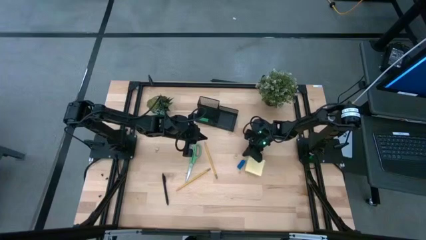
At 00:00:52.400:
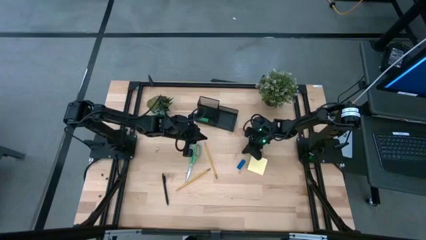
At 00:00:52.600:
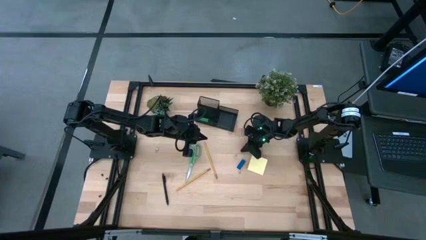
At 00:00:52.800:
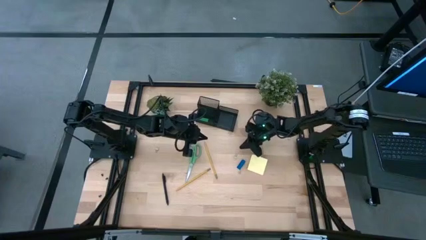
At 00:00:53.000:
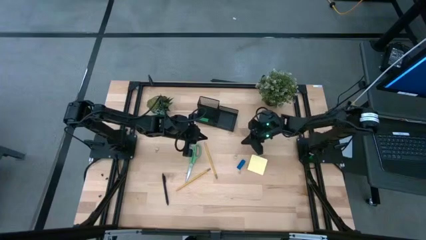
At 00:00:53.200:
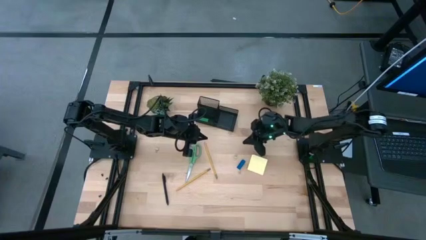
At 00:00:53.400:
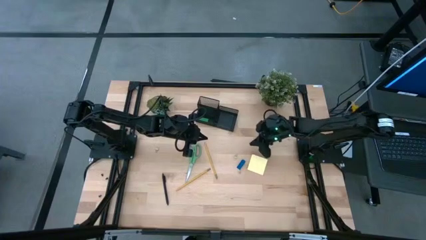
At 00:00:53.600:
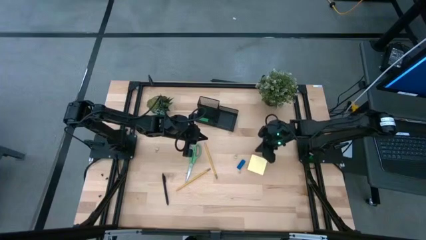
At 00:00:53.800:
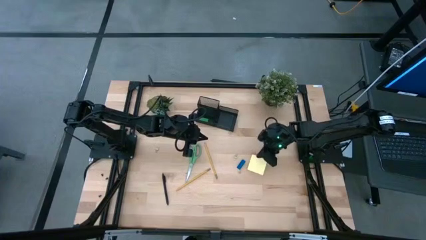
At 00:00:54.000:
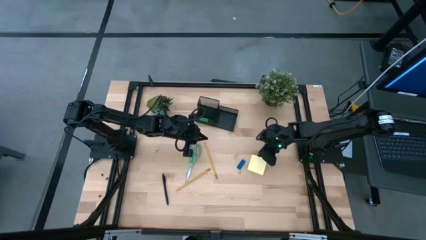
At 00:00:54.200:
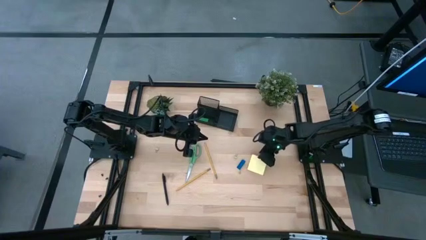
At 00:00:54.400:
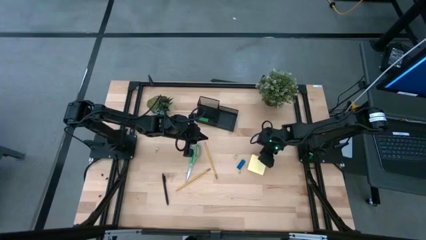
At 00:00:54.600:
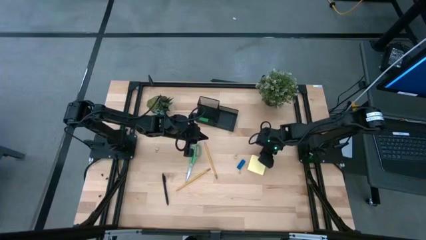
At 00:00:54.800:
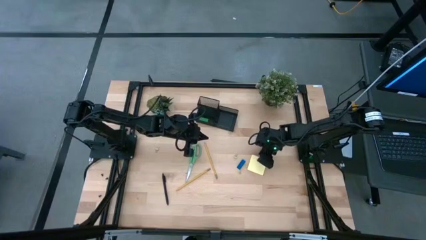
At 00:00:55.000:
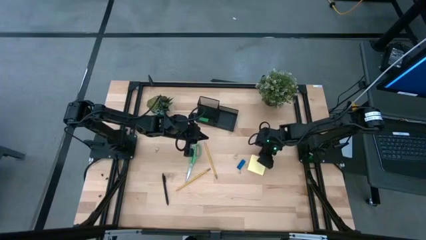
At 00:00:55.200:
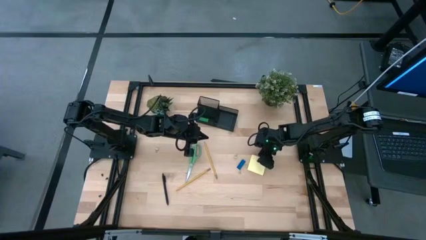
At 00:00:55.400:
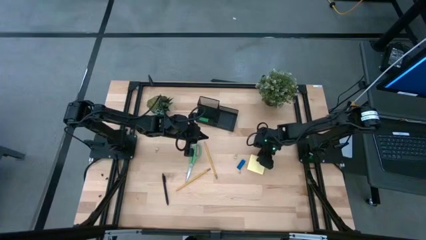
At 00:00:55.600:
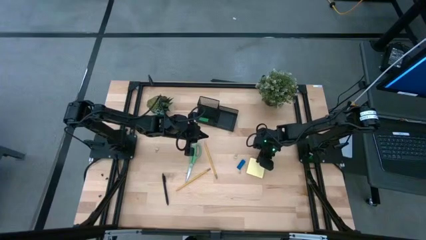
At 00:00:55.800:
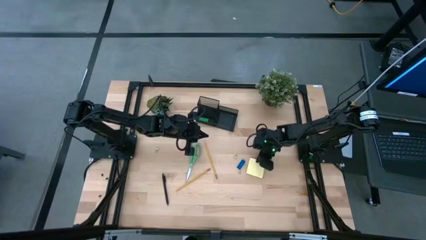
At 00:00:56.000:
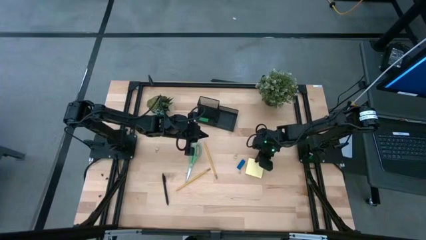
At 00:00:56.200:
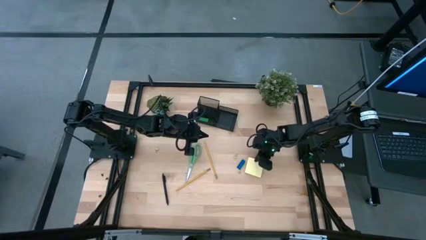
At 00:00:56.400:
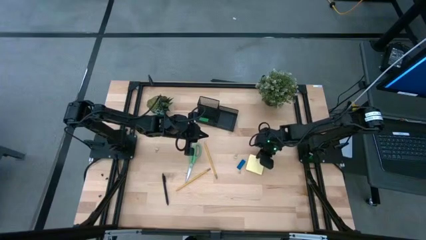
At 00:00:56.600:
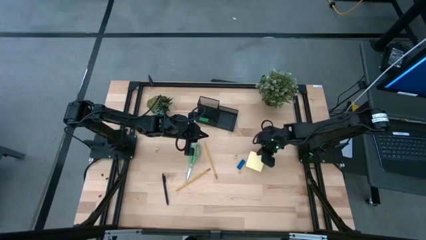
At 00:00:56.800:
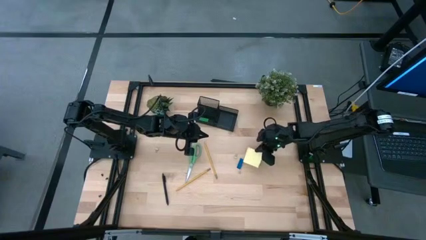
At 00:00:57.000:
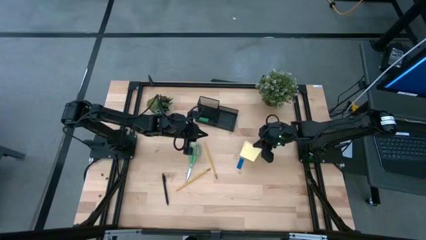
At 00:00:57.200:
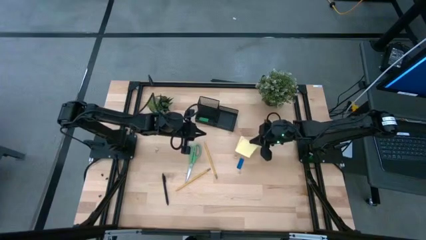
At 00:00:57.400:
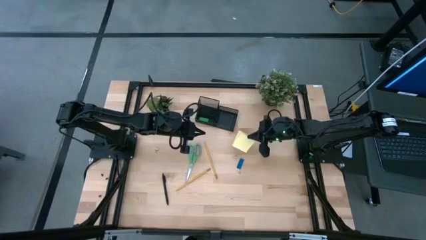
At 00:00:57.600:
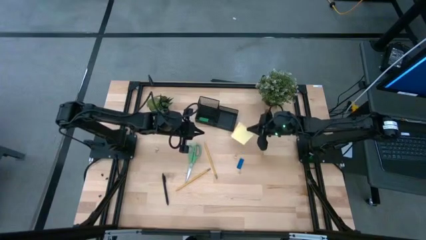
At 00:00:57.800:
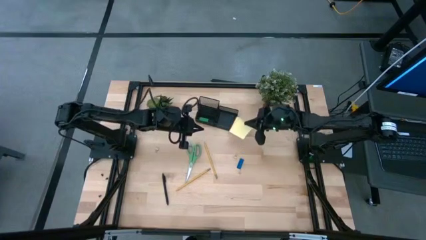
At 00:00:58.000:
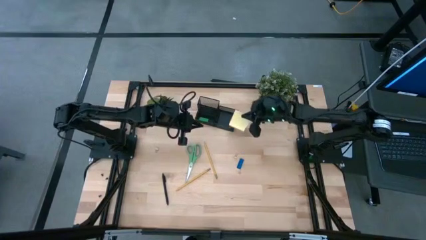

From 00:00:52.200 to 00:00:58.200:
Task: Pick and place office supplies into organizer
Put the sticky notes into the desk organizer

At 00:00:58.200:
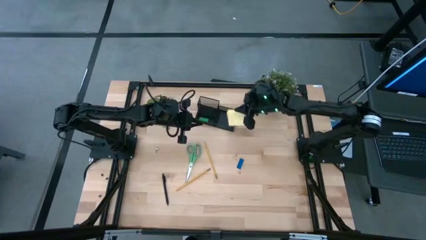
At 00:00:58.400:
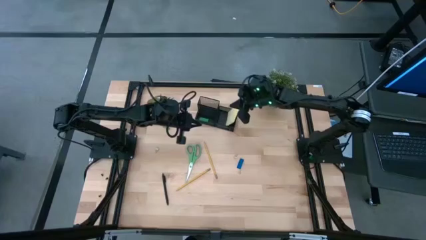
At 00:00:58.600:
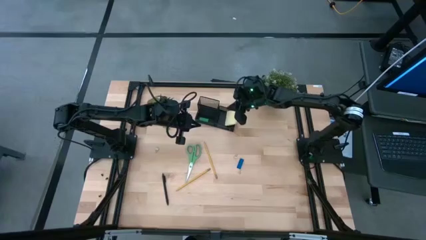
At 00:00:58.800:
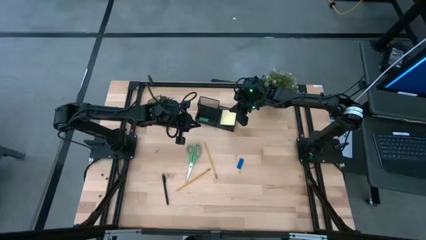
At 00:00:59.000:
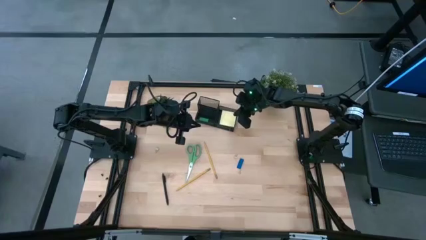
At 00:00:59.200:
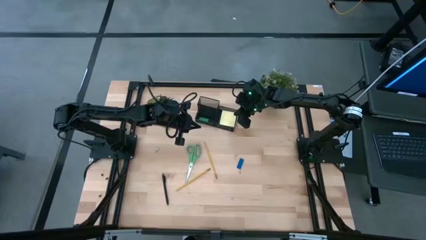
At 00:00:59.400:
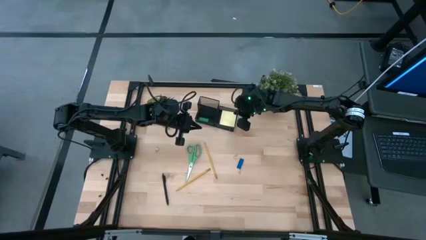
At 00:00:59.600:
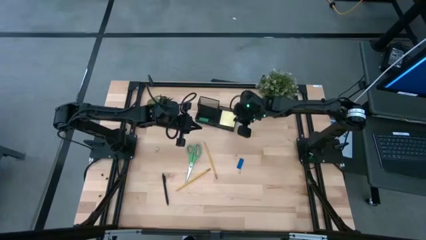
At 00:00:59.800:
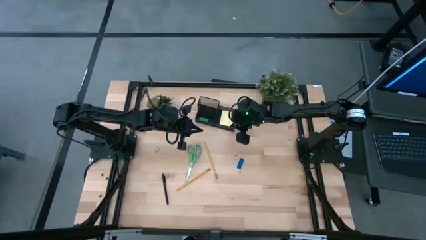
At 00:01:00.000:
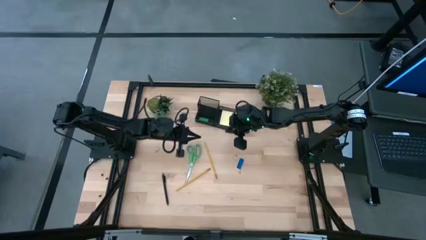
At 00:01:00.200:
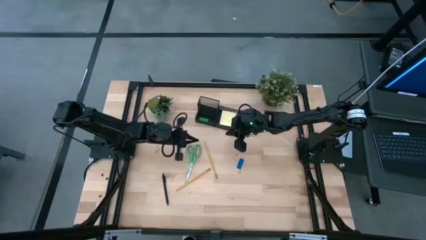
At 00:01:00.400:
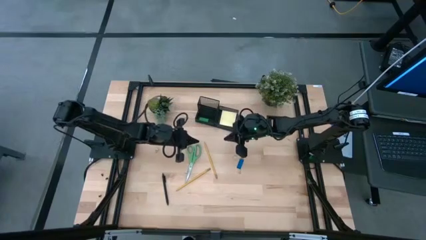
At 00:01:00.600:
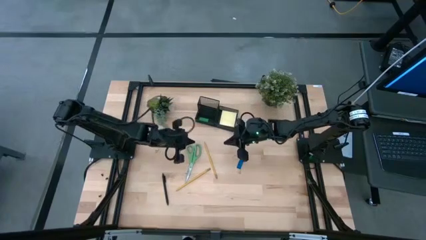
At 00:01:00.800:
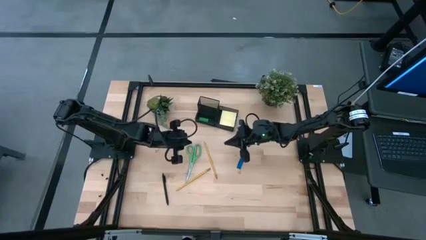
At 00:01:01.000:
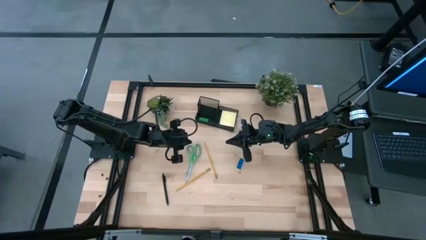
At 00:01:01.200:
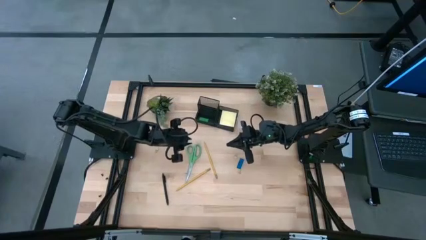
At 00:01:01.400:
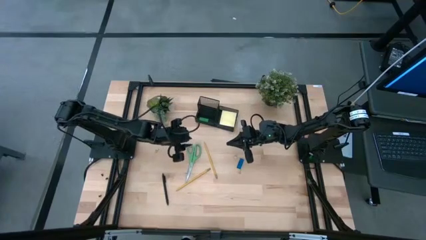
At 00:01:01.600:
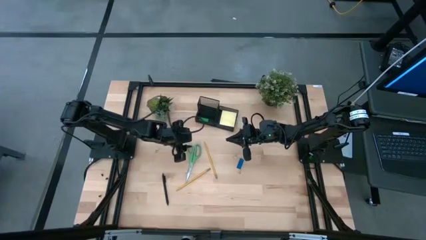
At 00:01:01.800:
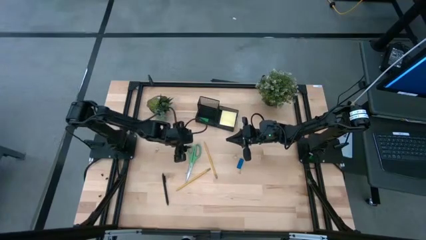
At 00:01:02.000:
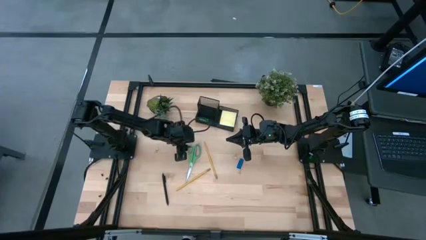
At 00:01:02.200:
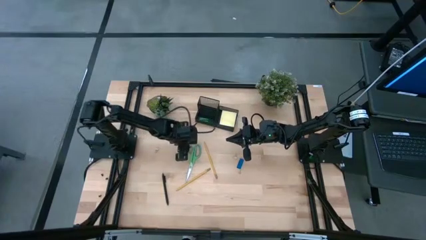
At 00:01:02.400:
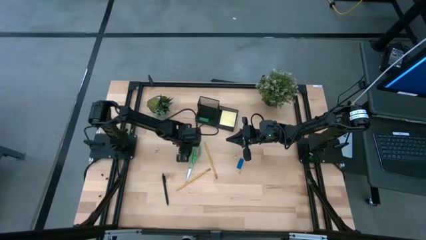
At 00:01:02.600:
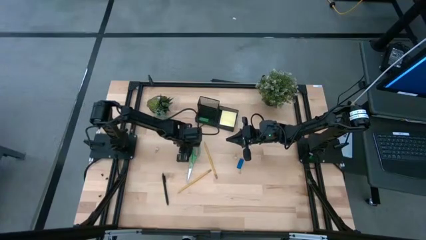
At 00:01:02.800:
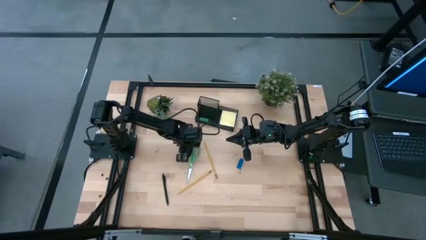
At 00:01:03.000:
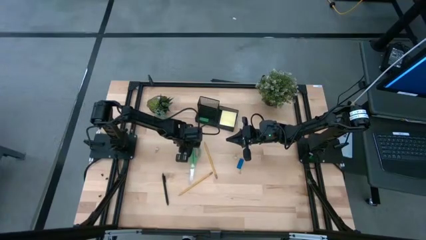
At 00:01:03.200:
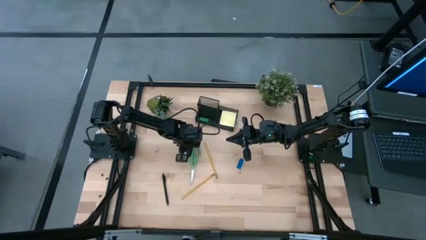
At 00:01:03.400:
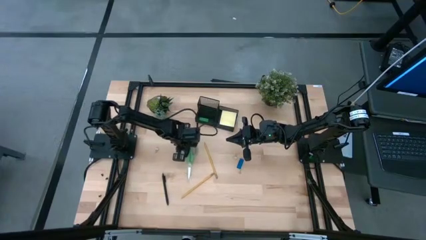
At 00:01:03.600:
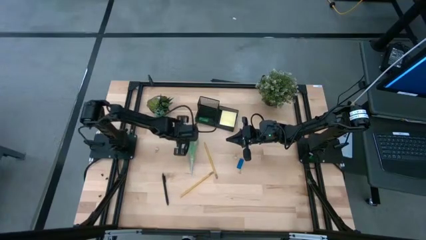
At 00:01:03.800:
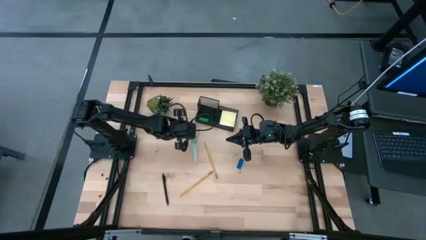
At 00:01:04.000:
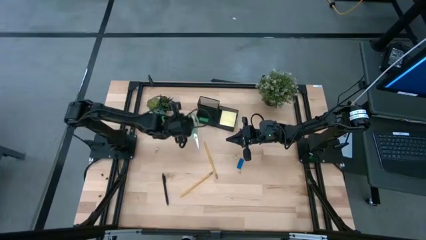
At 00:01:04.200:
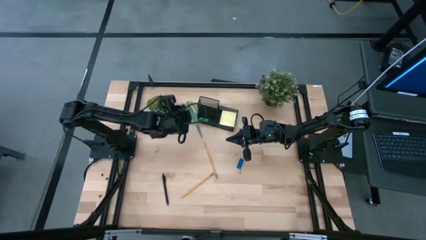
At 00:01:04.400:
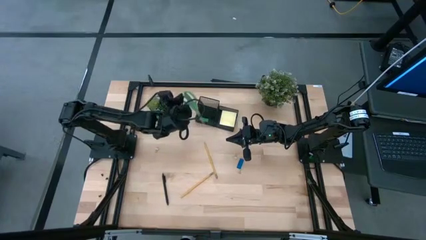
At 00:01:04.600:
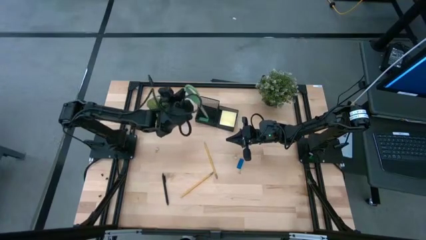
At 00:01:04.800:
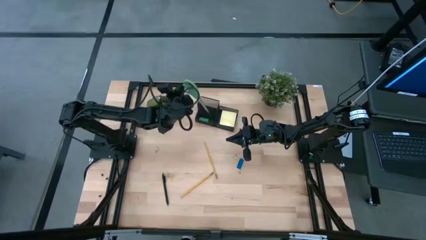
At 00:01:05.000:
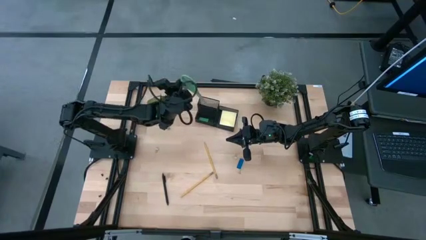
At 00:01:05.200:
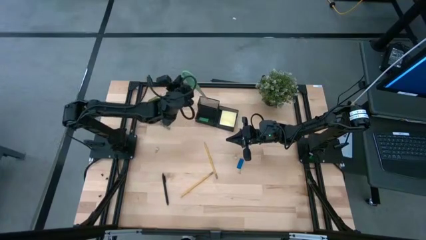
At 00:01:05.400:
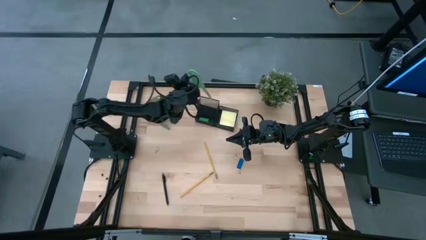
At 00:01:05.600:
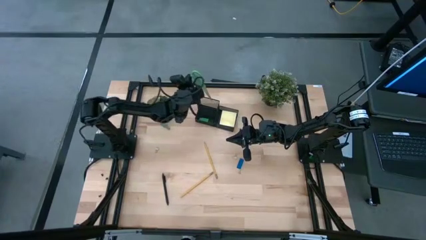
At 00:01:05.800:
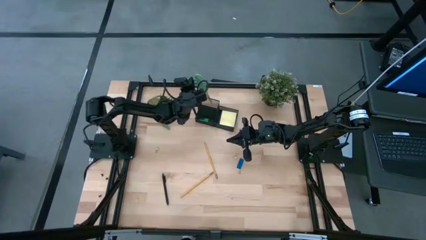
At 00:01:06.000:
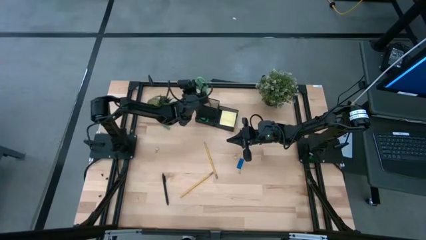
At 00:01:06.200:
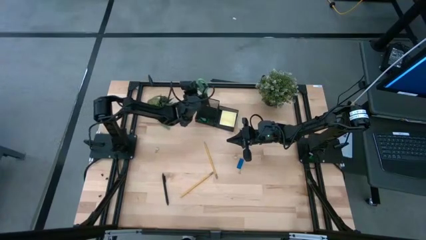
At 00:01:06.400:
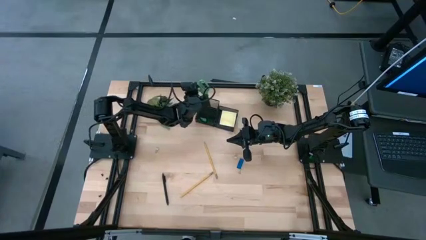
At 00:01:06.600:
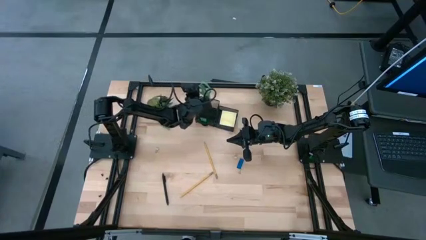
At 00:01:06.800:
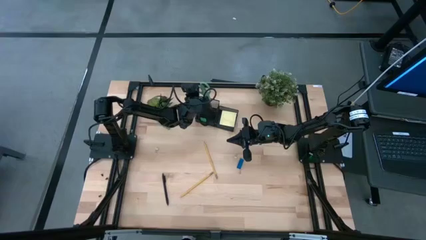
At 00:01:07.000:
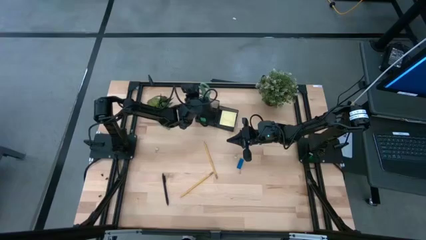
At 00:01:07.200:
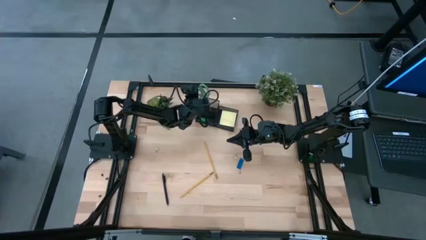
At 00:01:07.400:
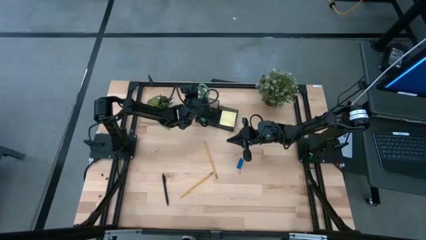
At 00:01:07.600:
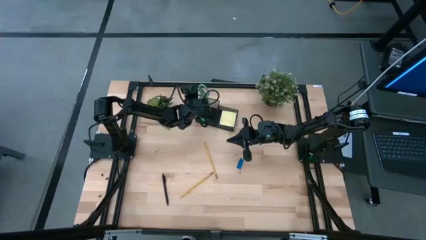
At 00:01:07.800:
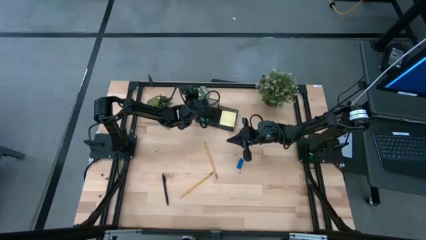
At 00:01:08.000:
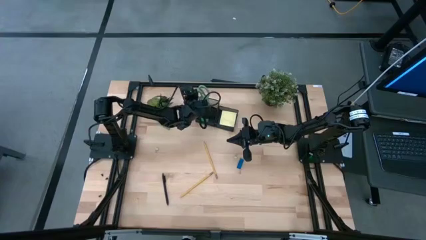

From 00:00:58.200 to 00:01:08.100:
Put the scissors into the desk organizer

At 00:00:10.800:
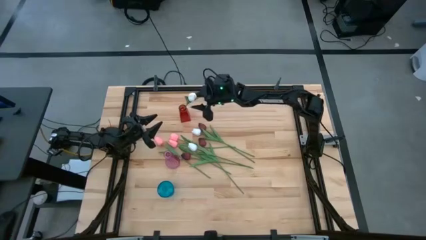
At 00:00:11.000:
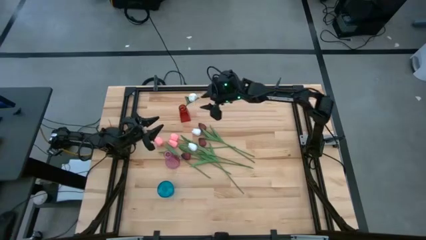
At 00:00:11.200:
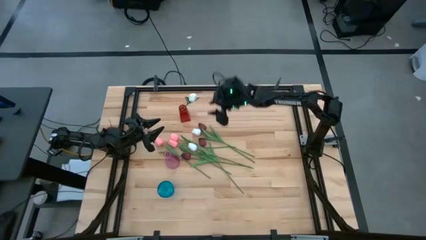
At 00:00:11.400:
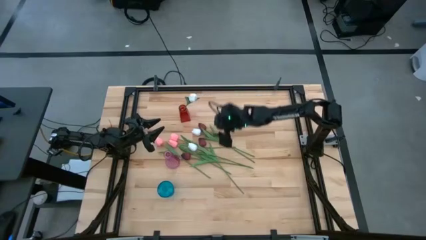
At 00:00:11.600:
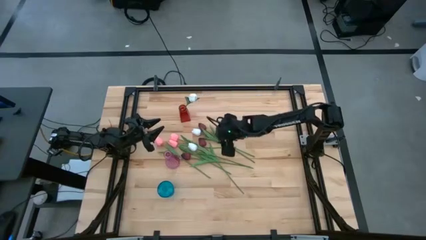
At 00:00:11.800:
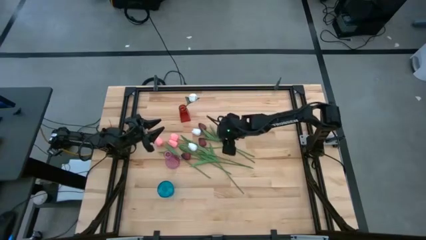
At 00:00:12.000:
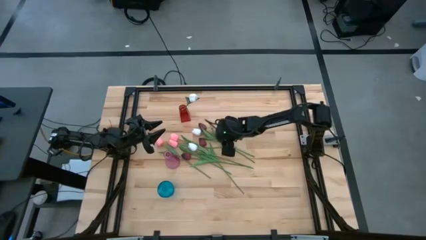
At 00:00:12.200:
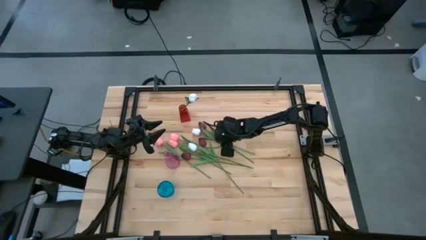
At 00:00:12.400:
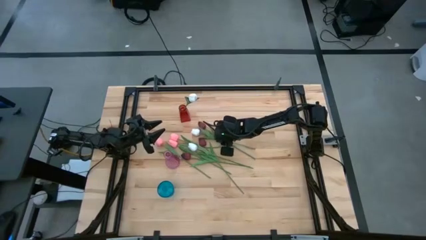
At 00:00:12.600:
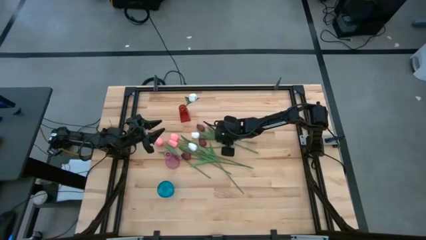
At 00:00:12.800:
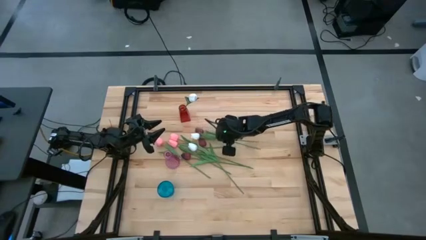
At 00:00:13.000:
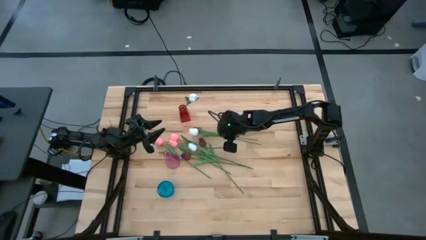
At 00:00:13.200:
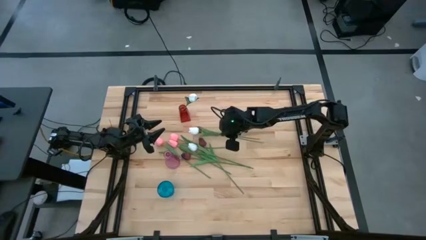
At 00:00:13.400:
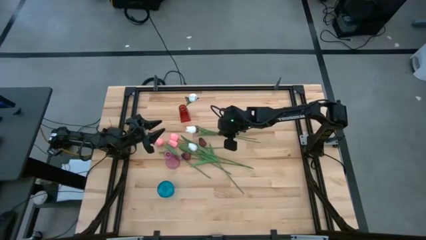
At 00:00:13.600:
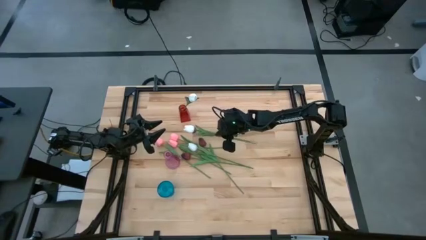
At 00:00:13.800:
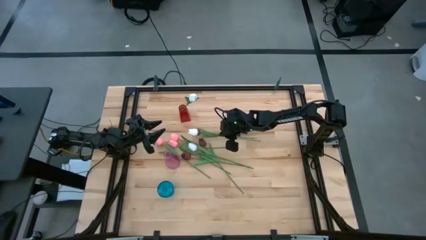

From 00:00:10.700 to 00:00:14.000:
Task: Sort flowers into vase by color
Put the top white tulip into the red vase
